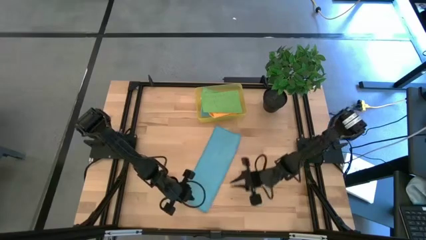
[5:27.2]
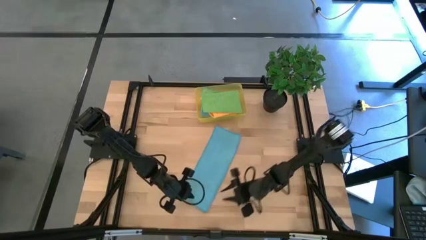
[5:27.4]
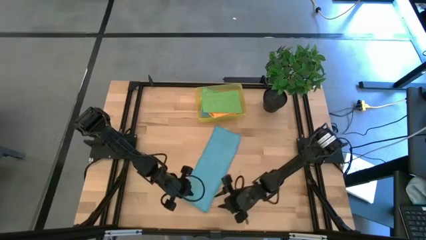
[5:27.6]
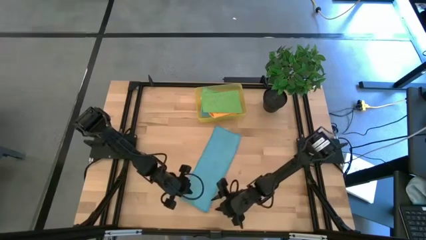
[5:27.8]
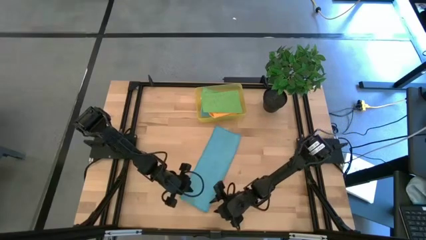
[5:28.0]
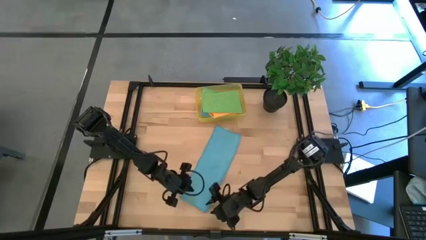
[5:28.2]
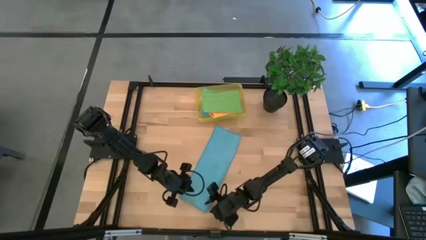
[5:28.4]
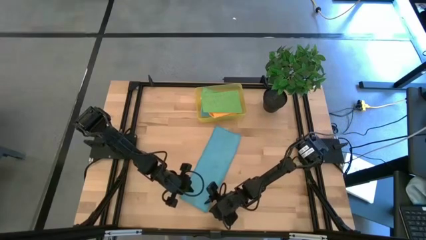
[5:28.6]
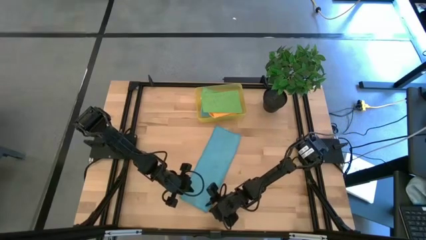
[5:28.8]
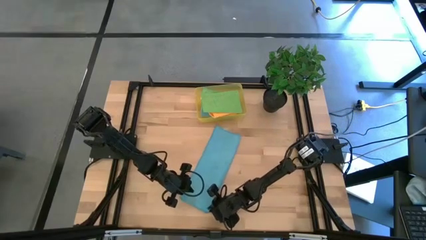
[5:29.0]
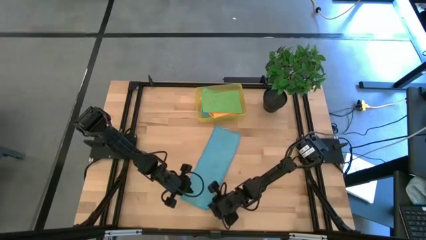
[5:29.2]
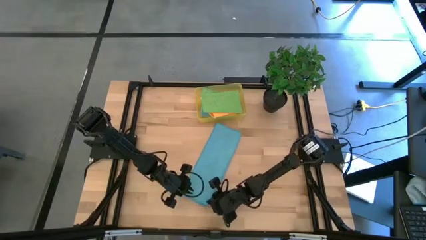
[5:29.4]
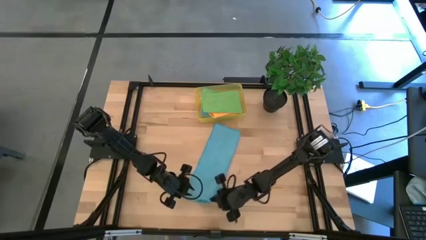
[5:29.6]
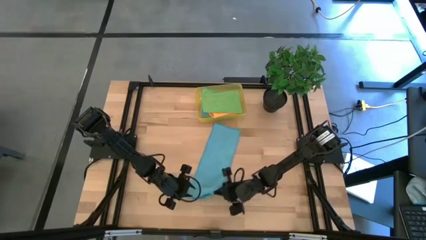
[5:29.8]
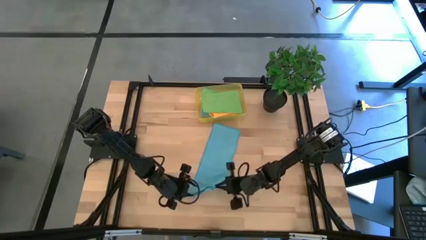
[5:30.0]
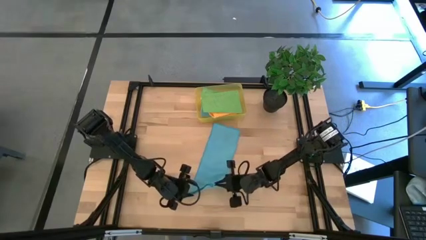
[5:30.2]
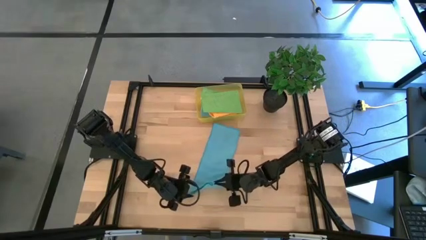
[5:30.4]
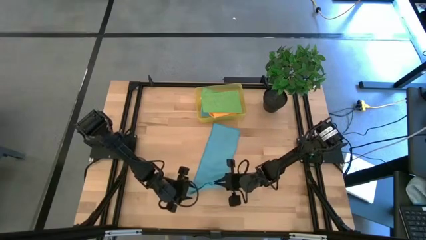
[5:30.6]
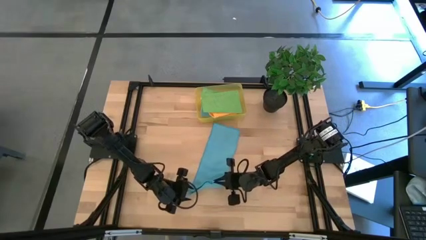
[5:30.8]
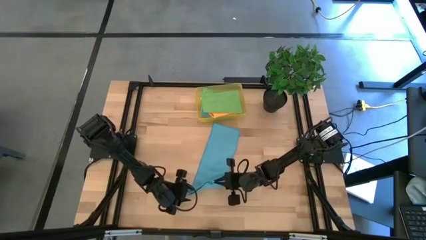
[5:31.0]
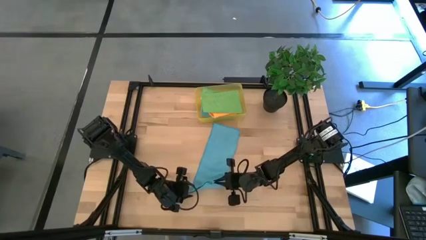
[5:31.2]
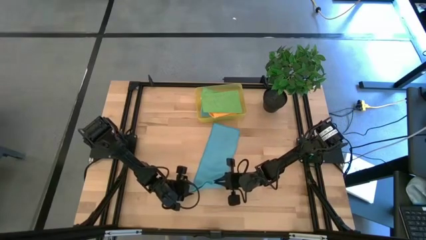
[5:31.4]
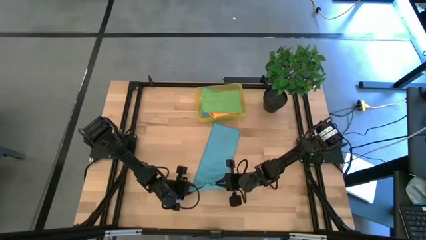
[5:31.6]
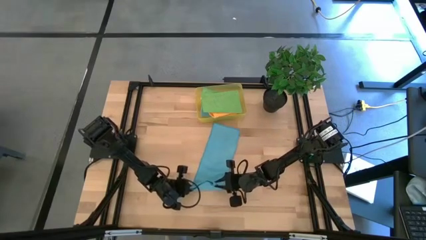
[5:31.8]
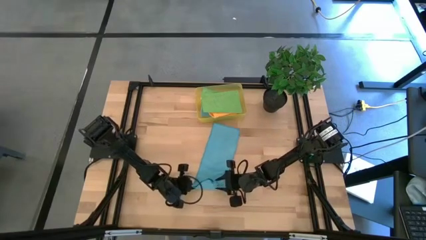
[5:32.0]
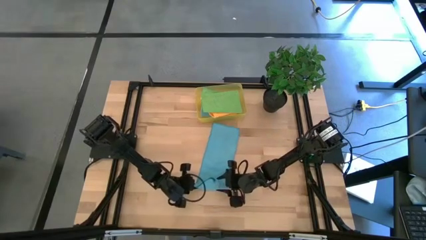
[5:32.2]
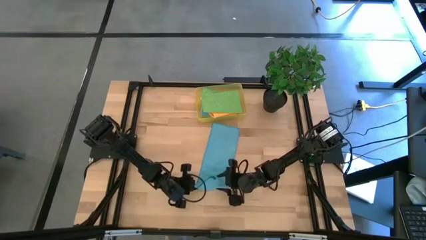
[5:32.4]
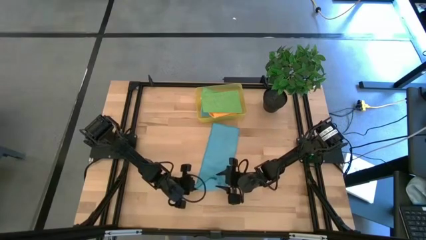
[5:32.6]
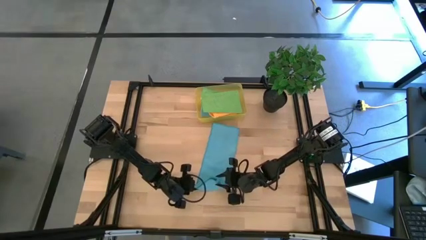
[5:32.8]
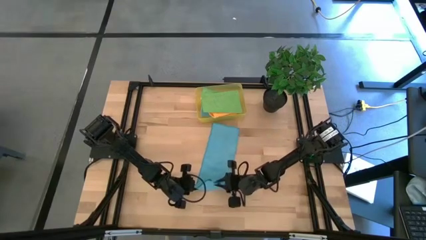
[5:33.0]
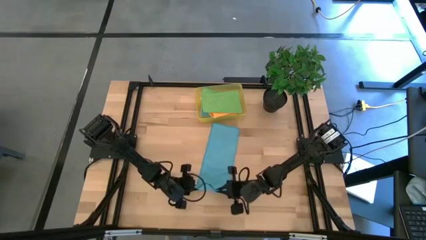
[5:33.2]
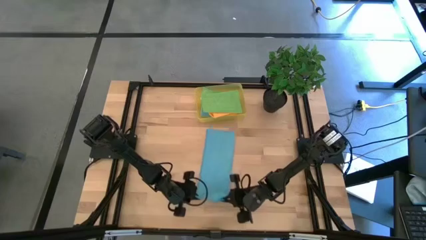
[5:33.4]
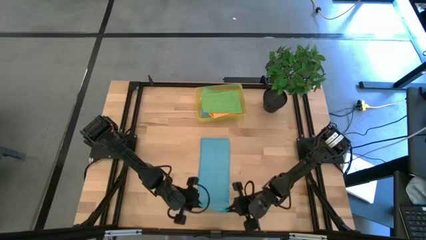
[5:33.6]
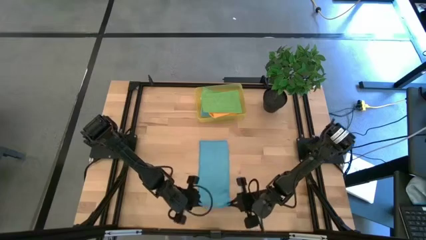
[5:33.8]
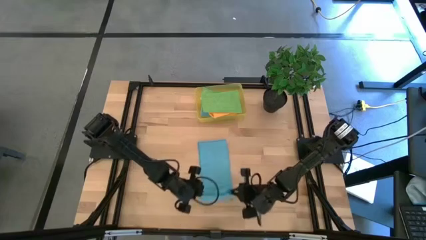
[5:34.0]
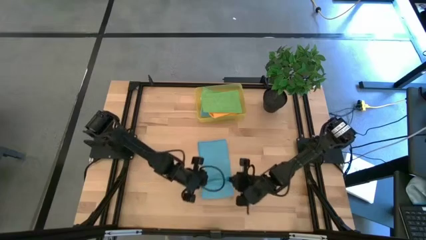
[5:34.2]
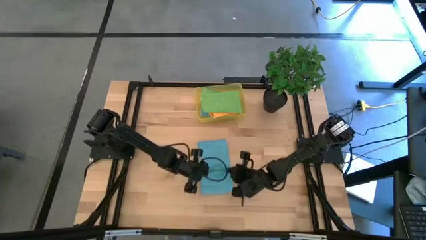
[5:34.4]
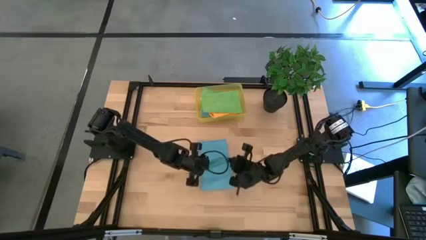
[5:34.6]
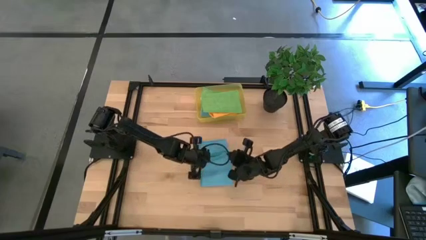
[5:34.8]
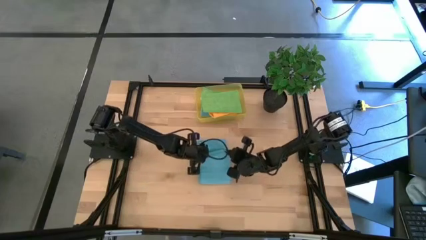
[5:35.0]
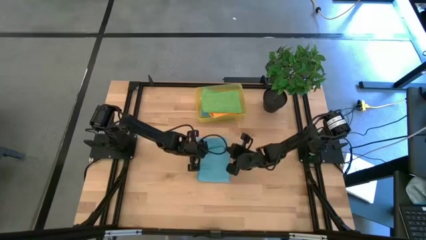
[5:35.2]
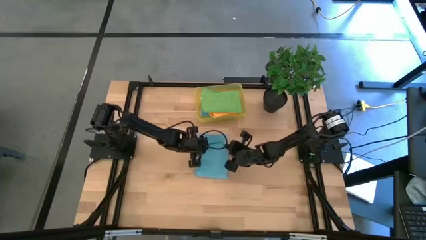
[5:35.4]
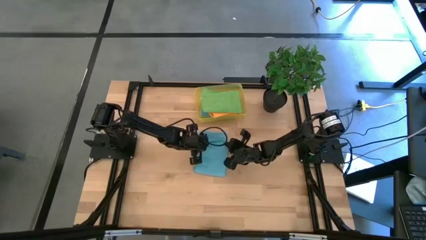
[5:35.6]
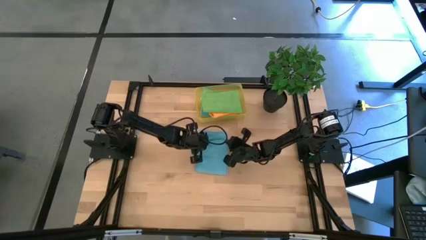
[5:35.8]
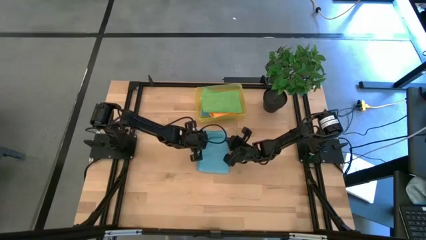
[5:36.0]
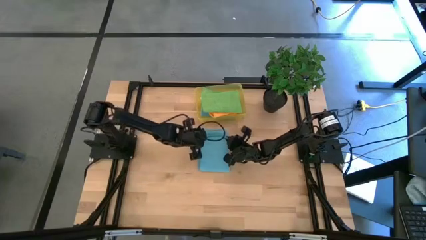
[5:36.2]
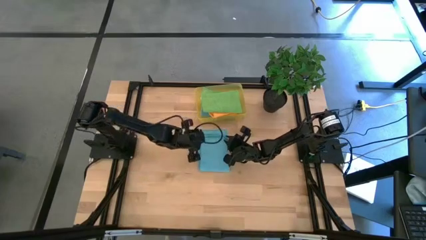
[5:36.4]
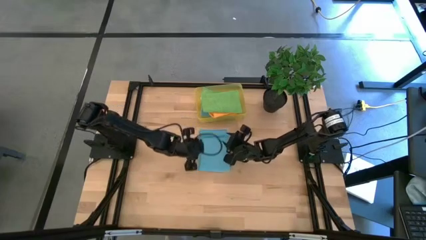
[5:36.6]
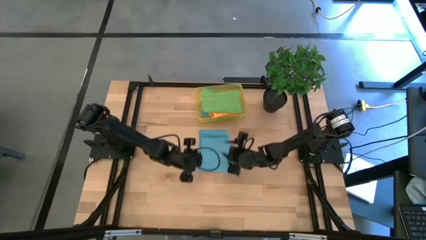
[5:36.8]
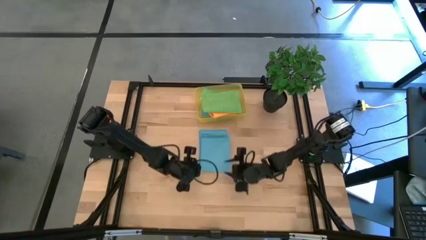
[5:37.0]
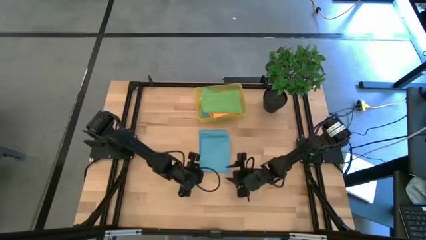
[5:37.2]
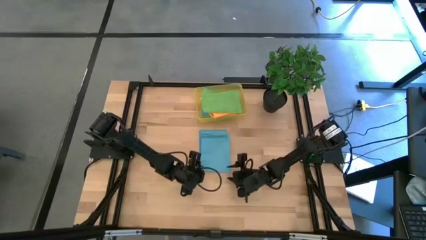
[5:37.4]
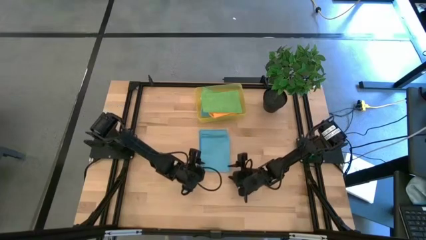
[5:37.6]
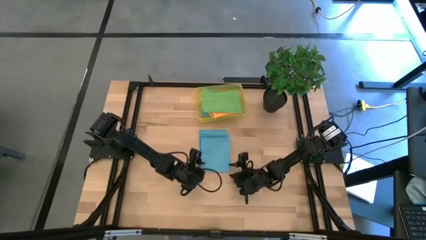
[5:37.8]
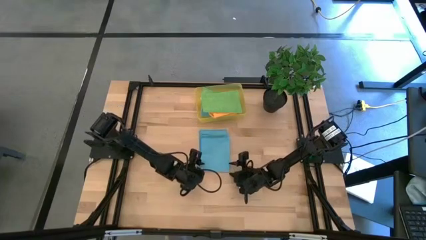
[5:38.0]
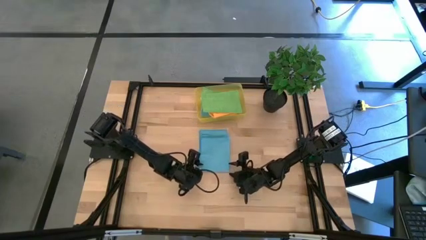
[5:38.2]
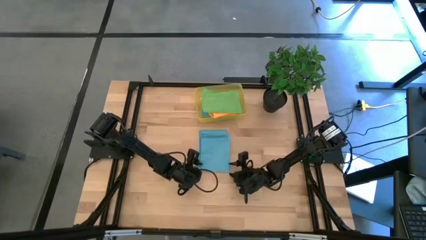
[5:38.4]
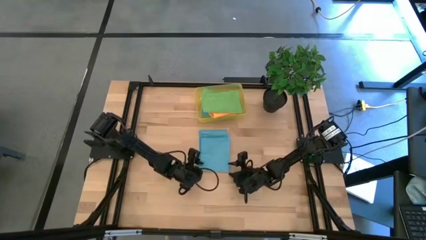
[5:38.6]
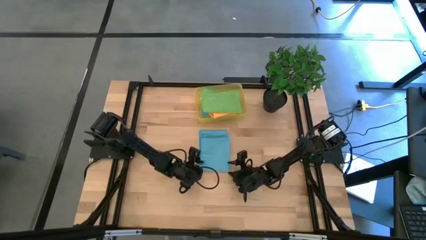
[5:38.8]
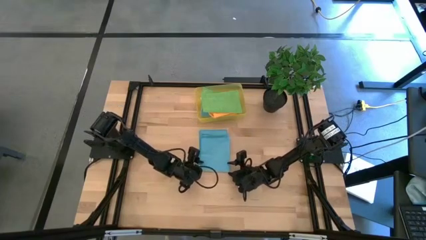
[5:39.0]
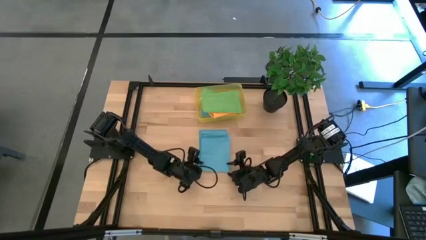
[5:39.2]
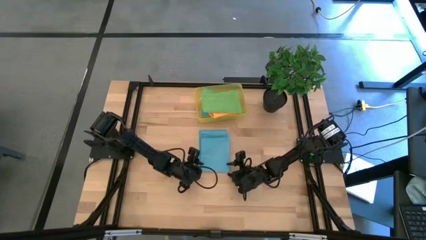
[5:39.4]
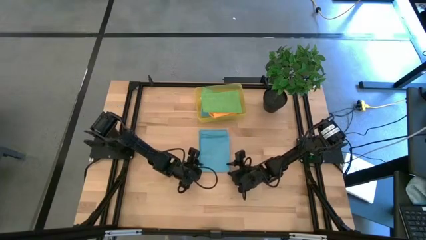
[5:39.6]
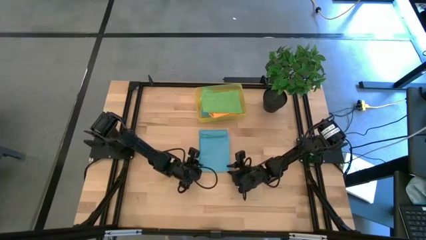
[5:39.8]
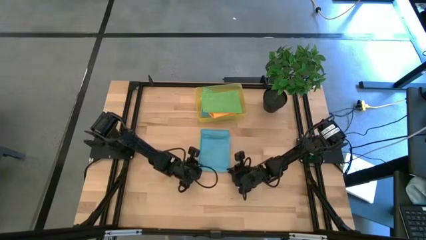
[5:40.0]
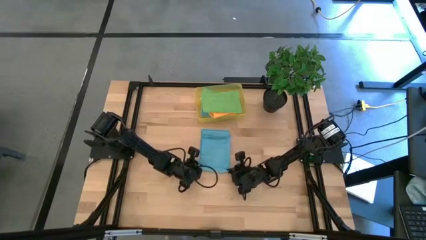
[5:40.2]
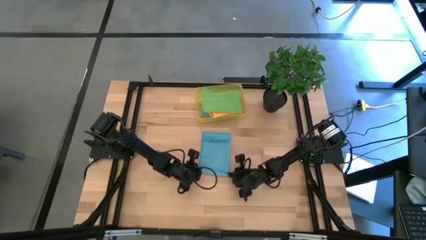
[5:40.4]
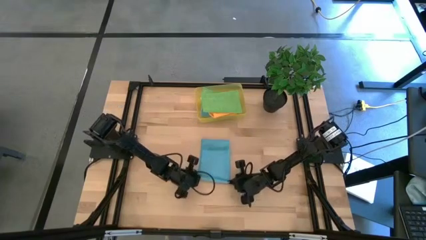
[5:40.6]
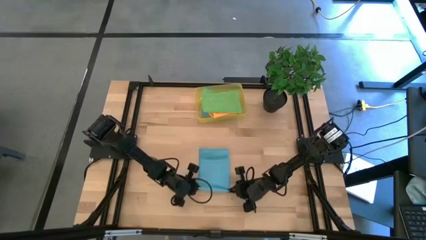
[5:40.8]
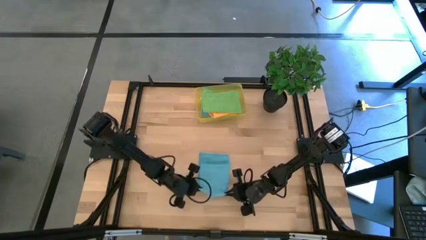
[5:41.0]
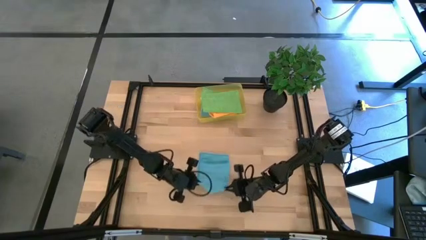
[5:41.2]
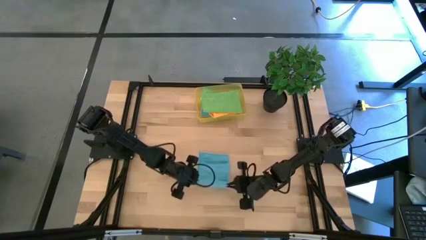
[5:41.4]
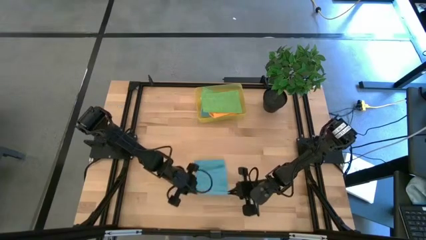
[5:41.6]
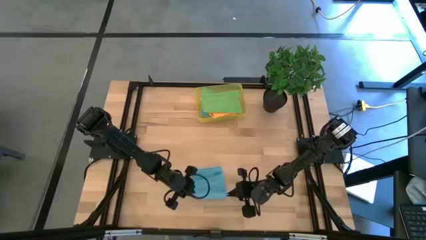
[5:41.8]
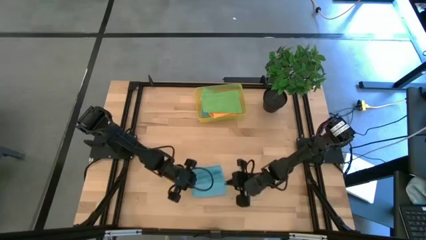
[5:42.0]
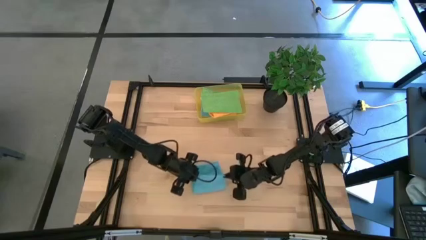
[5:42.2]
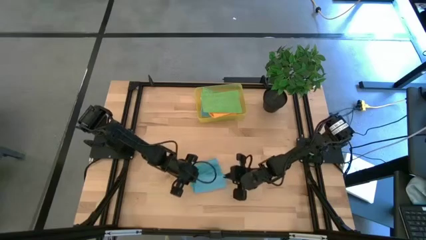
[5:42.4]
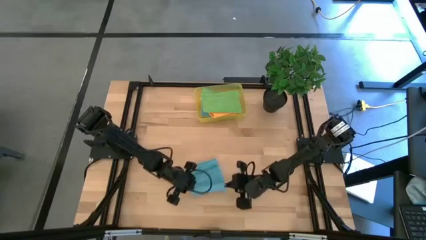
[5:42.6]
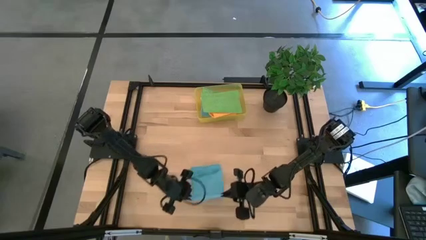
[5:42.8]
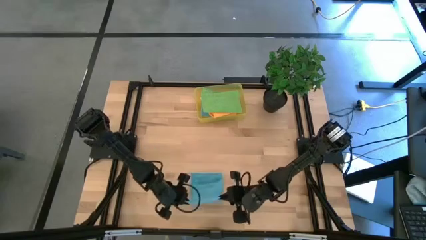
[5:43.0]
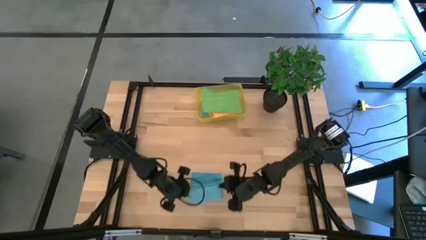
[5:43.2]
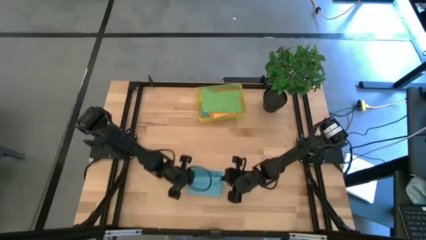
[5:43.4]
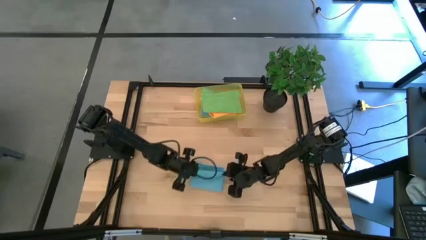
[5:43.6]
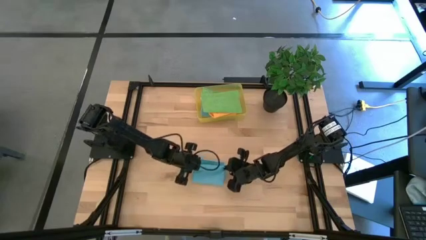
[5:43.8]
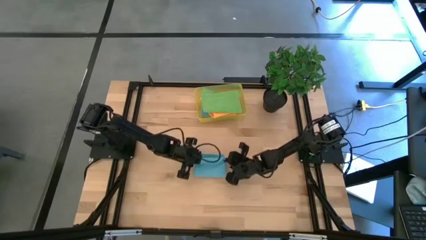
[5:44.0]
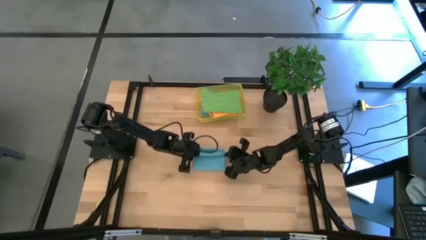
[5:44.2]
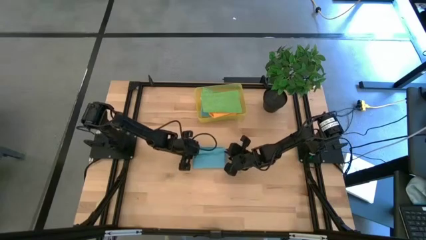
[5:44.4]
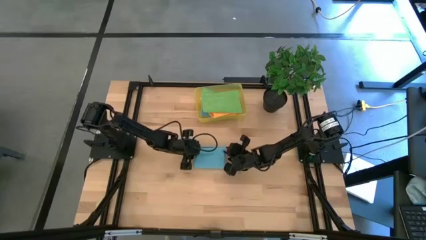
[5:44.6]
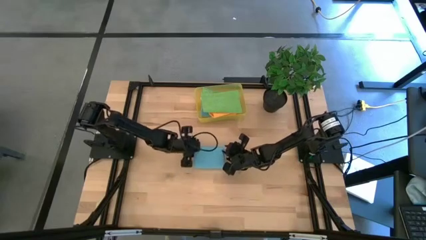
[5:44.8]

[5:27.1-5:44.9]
Task: Fold microfiber towels
Fold the blue microfiber towel
